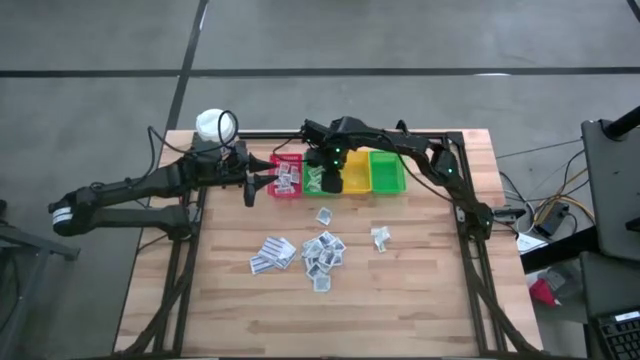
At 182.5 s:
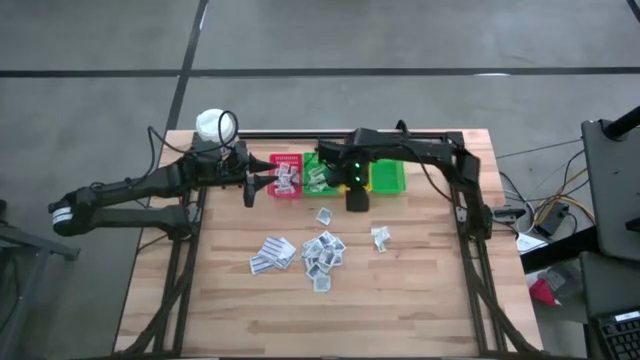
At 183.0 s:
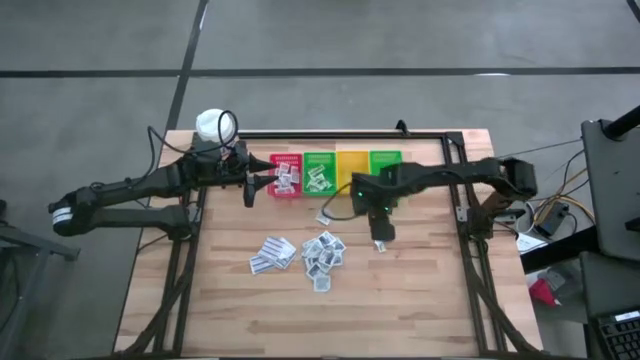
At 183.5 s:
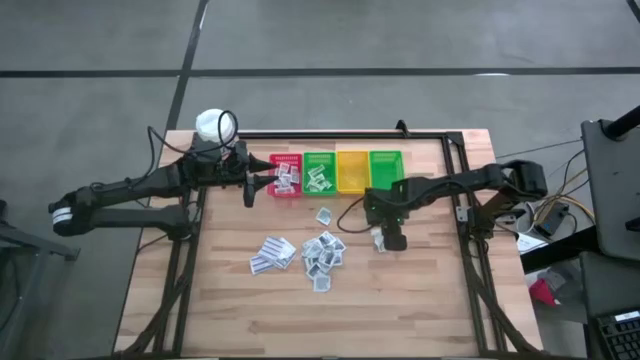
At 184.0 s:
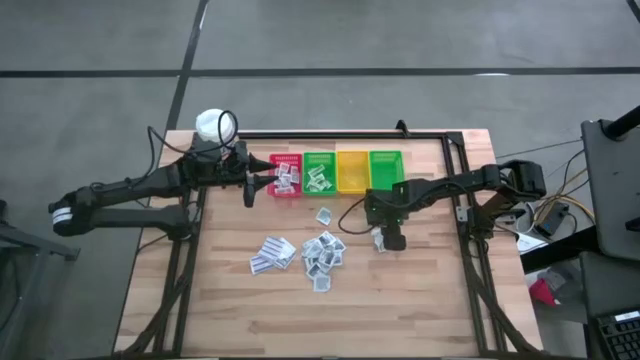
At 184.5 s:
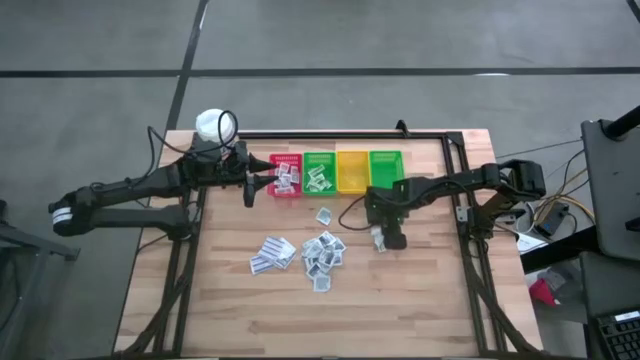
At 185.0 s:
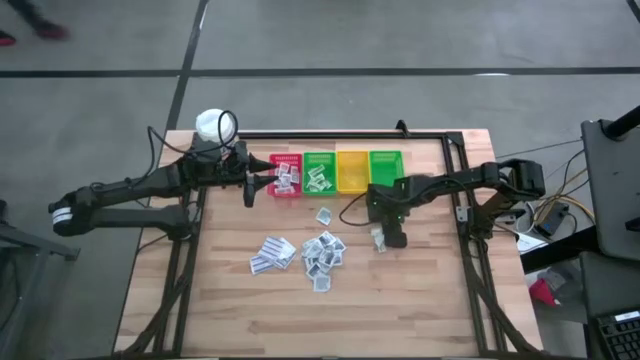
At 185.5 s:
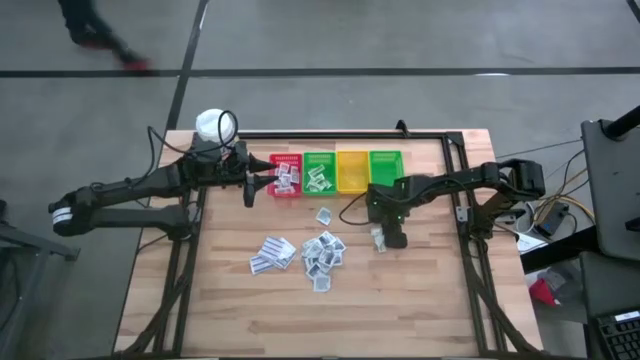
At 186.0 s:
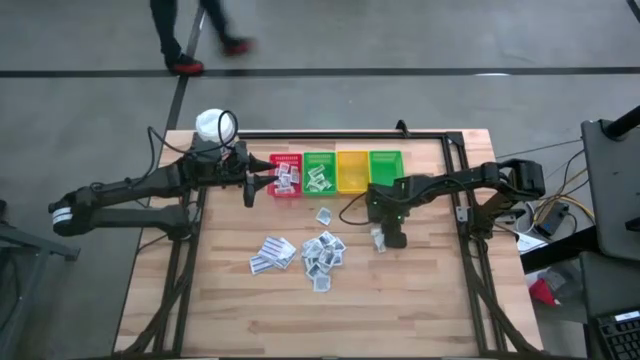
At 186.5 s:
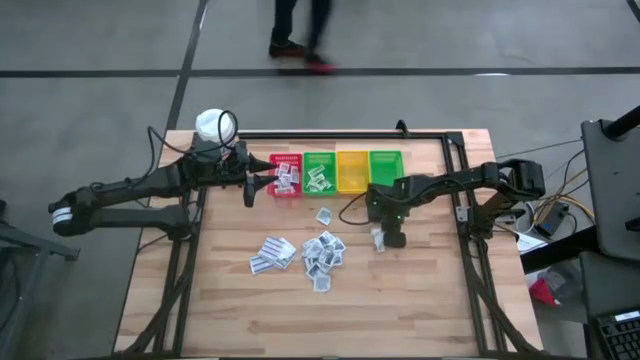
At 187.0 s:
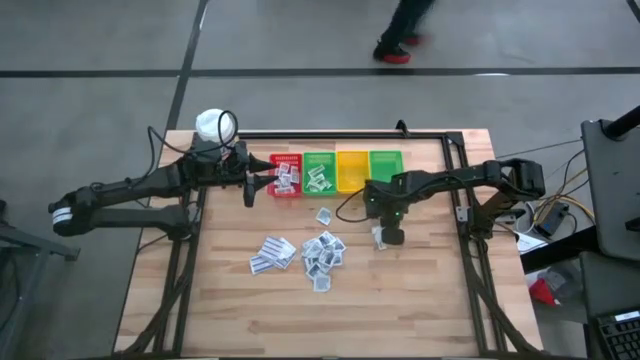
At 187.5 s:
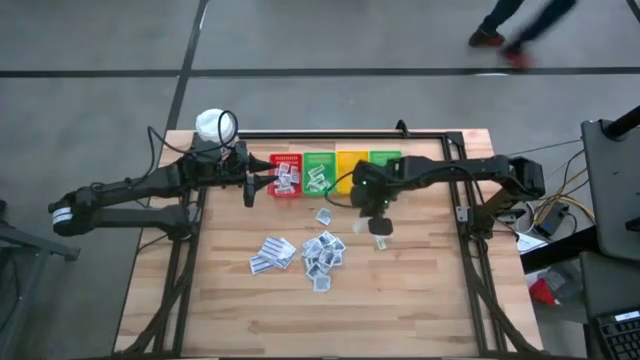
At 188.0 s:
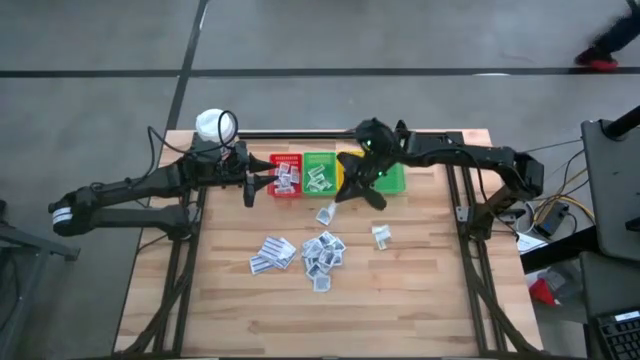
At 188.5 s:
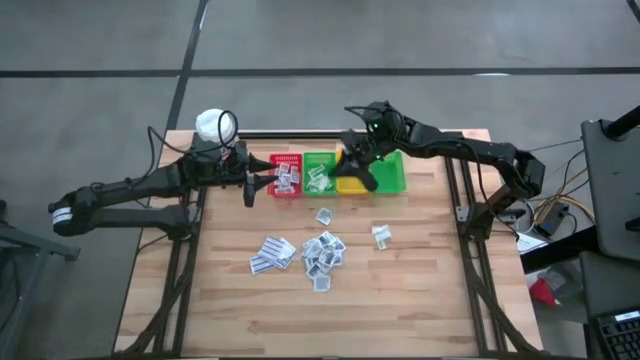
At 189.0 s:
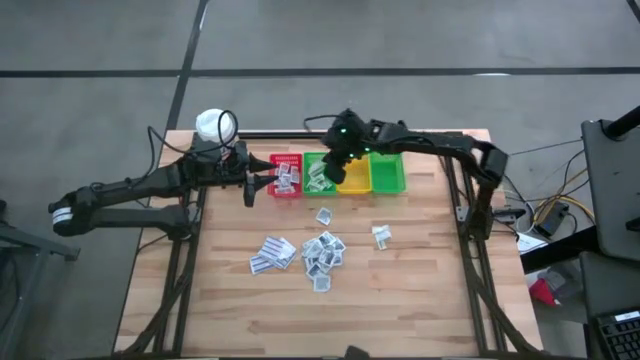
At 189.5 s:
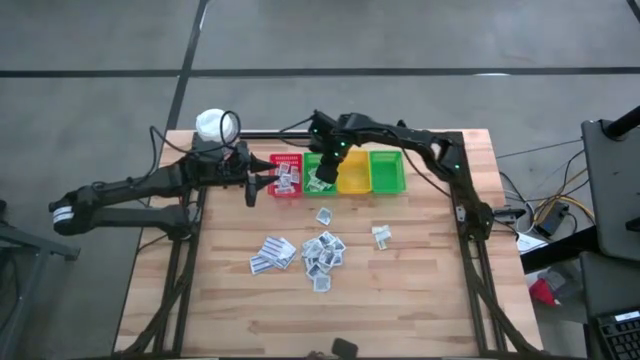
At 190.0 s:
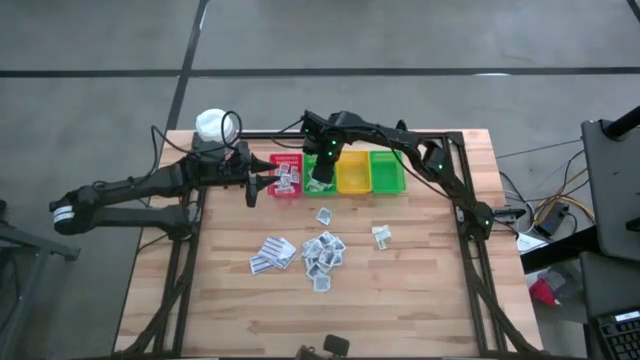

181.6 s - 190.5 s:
Task: Pick & Place First Aid Supplies
Put the green bandage into the left green bin

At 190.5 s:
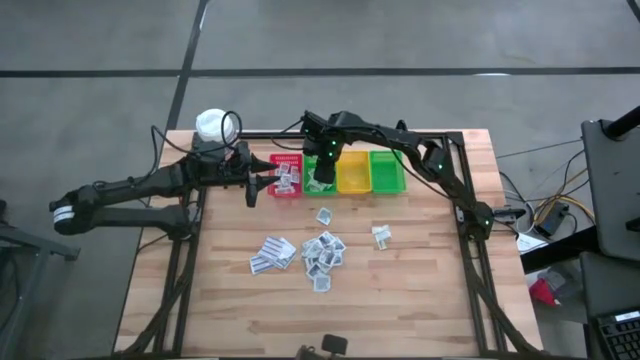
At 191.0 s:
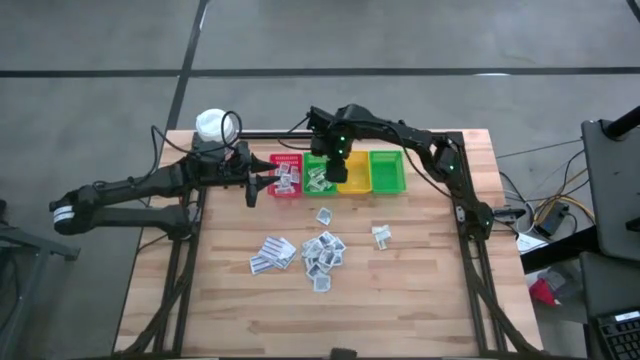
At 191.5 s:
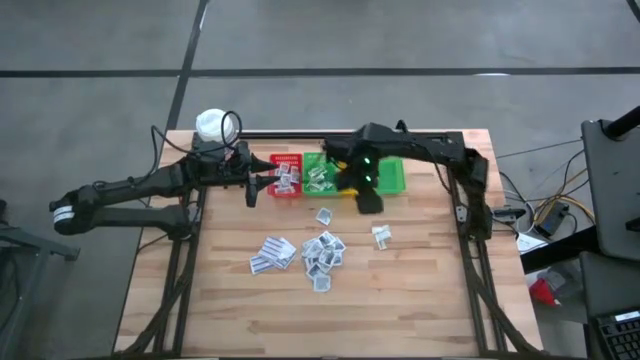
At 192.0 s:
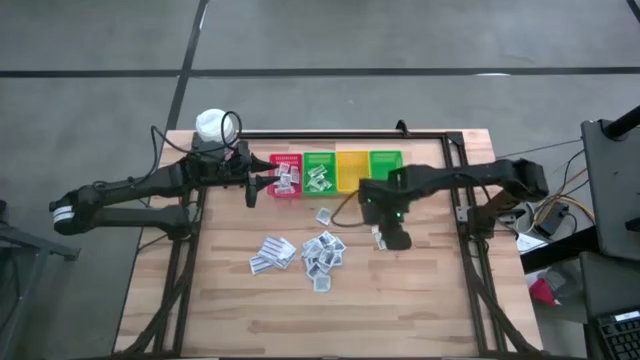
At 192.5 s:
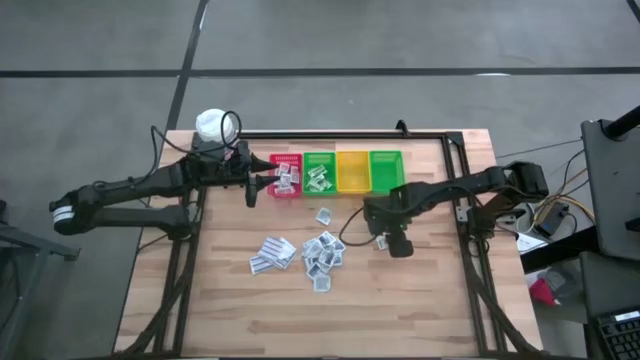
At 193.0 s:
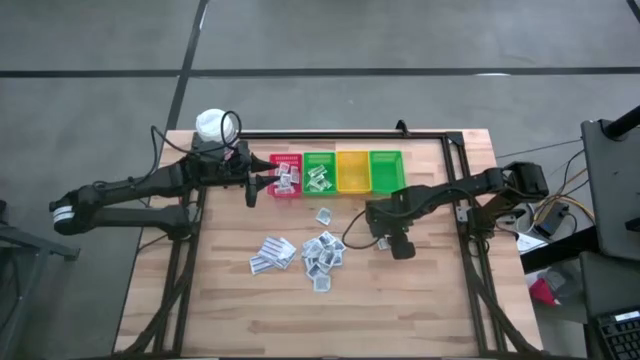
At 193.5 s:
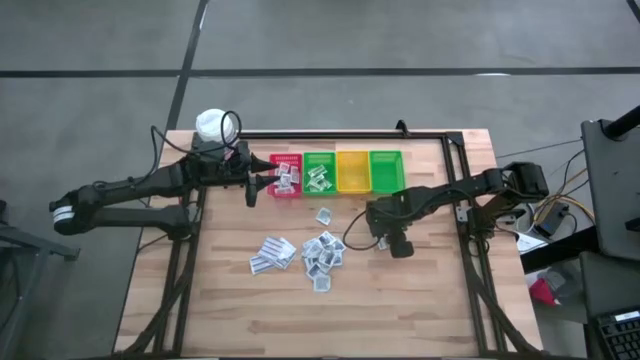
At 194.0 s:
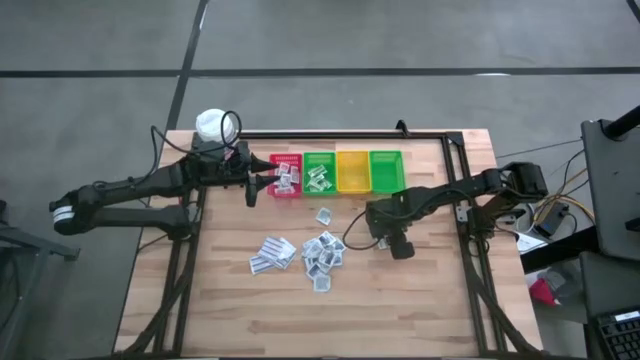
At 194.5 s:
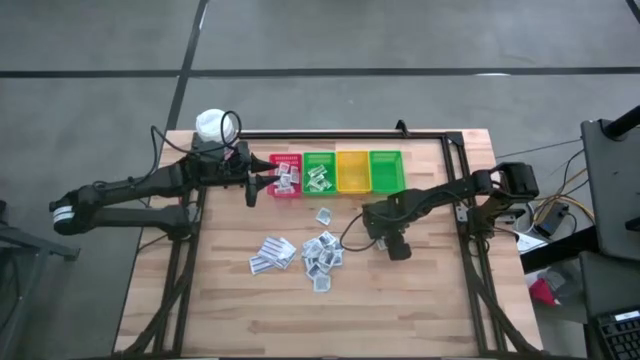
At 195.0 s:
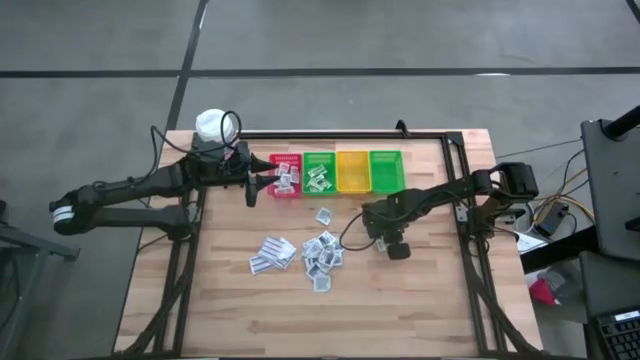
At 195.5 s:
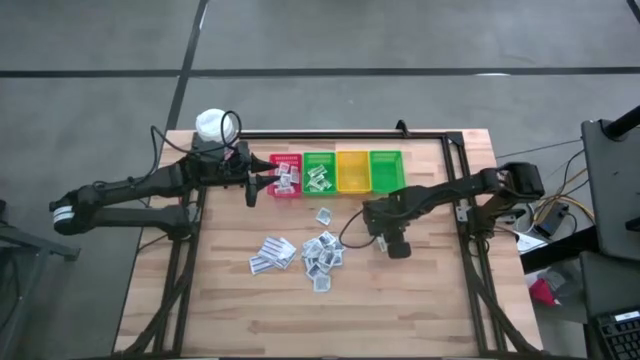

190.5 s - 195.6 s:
Put the green bandage into the left green bin

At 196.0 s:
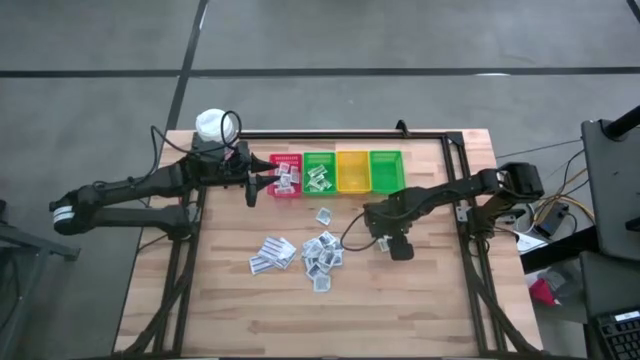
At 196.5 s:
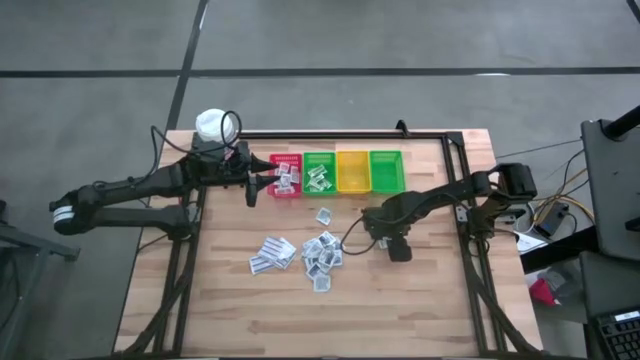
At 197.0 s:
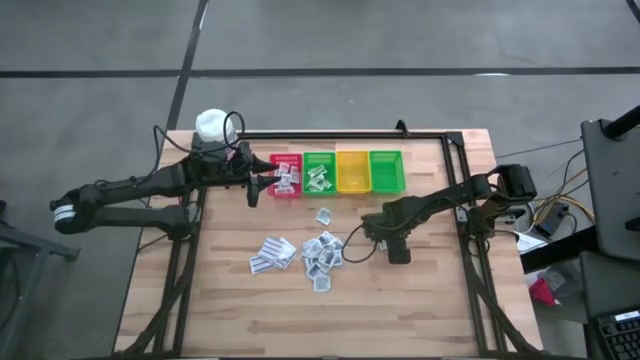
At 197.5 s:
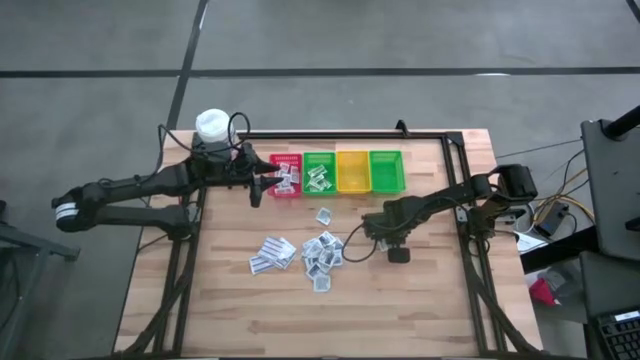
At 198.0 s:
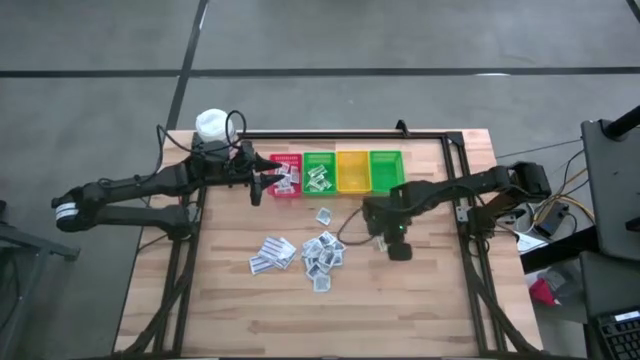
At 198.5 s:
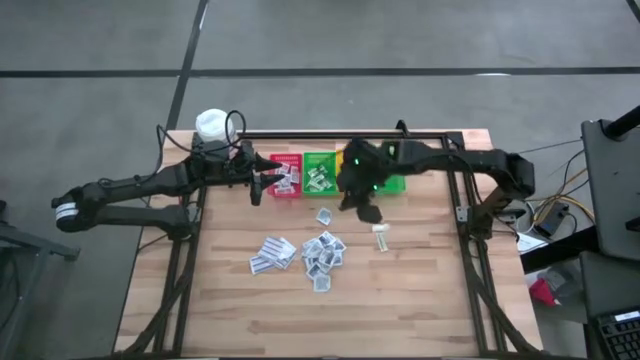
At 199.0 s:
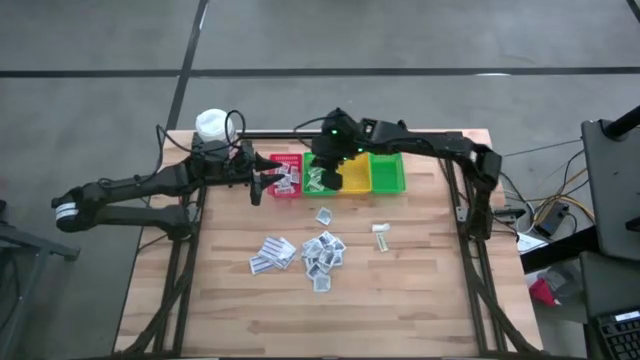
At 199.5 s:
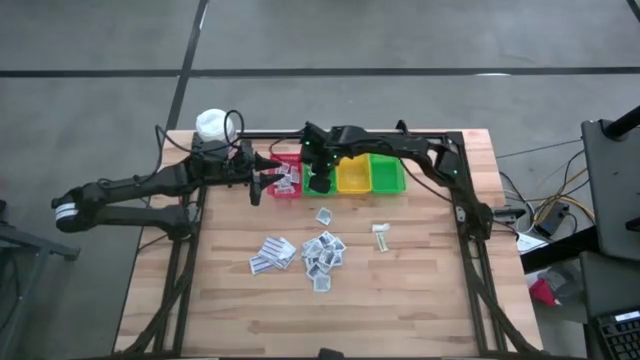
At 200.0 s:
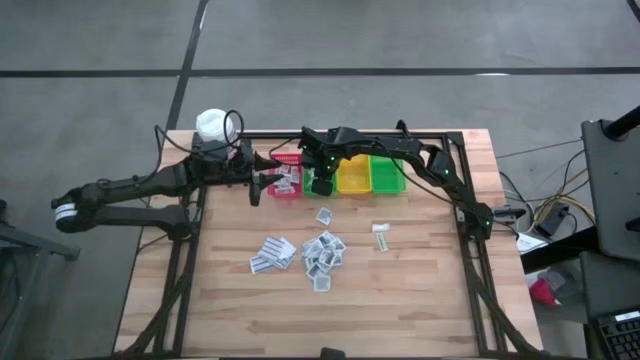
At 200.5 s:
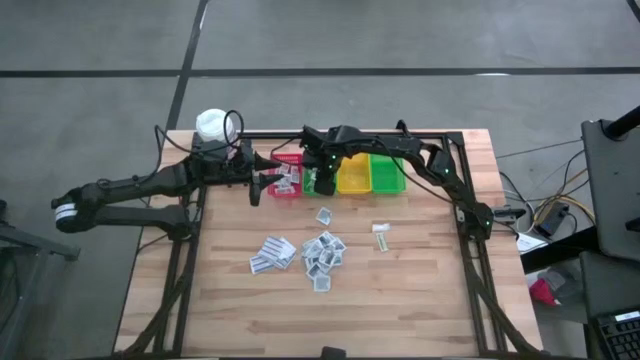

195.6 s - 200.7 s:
Put the green bandage into the left green bin
